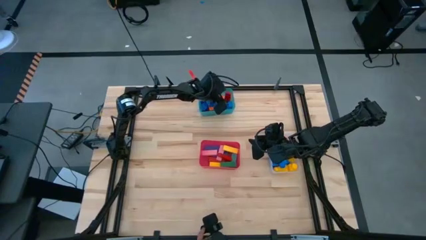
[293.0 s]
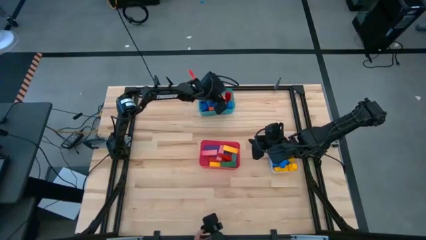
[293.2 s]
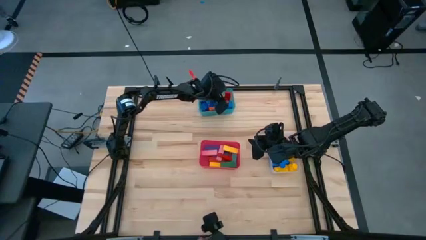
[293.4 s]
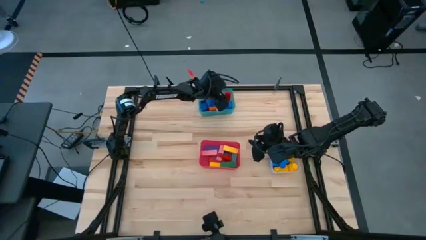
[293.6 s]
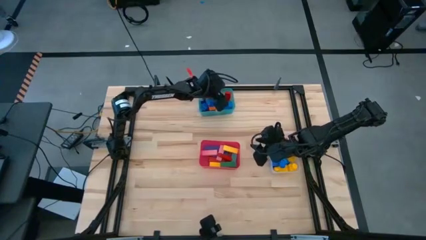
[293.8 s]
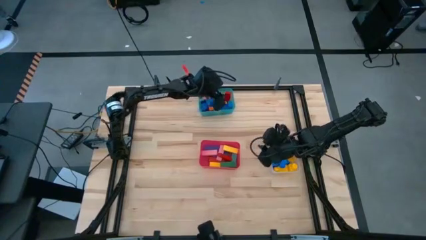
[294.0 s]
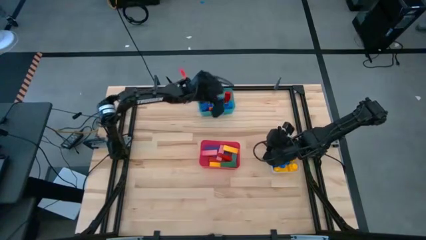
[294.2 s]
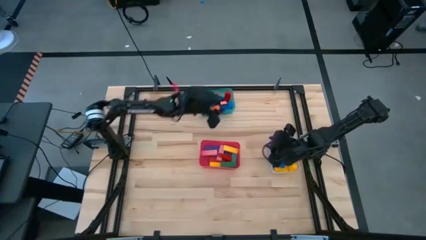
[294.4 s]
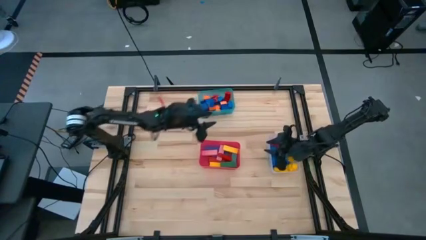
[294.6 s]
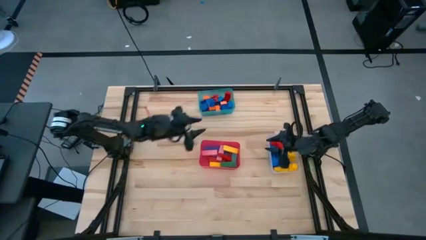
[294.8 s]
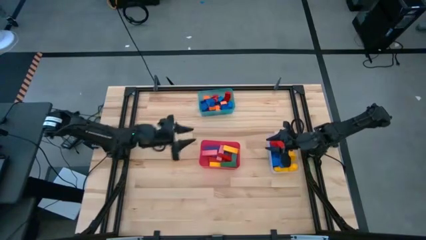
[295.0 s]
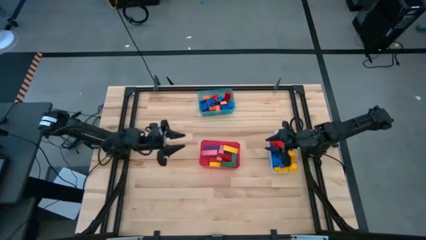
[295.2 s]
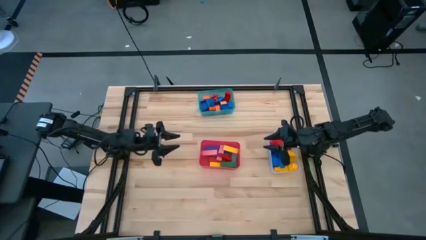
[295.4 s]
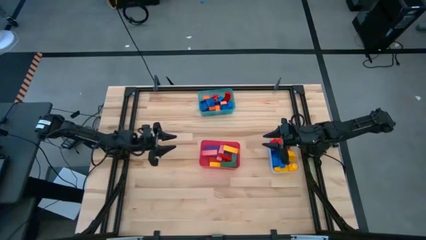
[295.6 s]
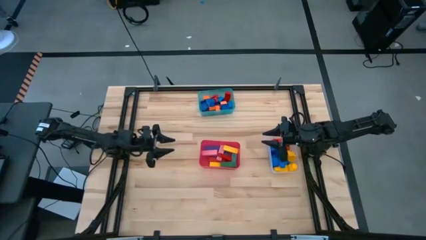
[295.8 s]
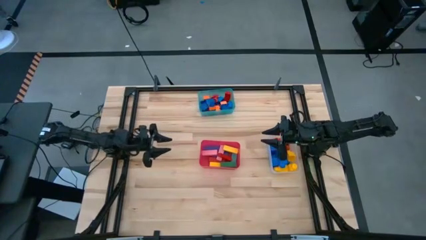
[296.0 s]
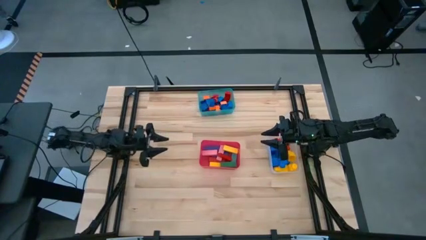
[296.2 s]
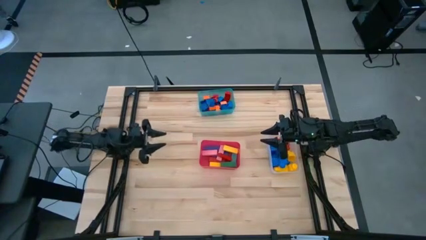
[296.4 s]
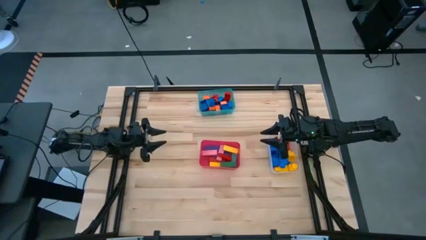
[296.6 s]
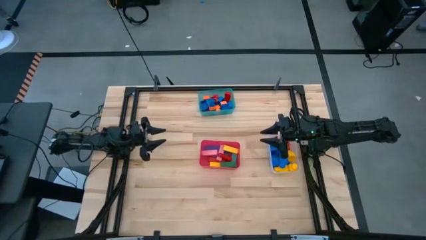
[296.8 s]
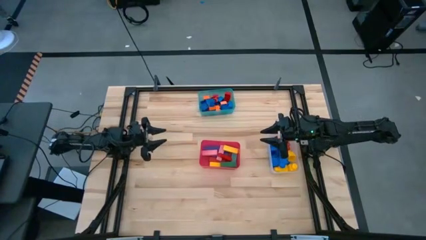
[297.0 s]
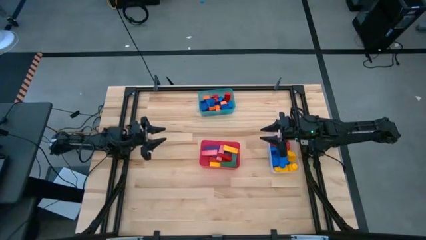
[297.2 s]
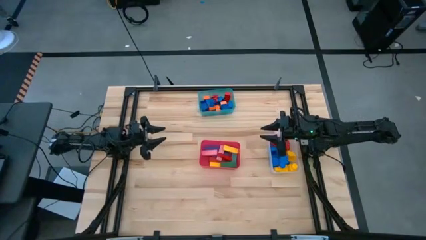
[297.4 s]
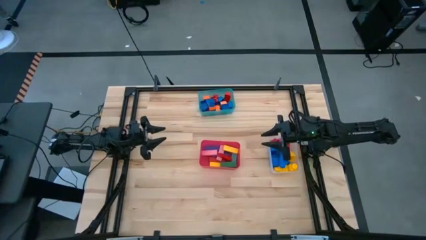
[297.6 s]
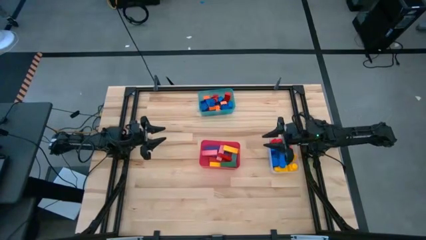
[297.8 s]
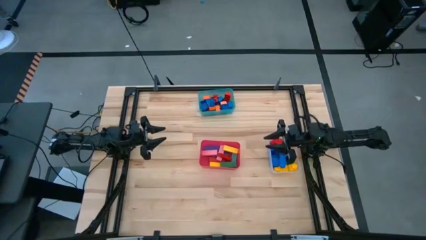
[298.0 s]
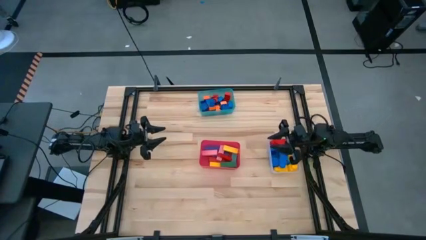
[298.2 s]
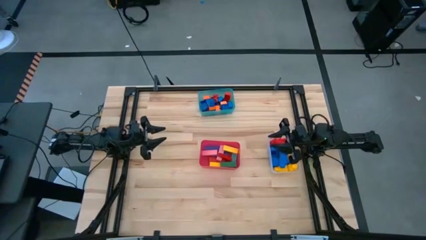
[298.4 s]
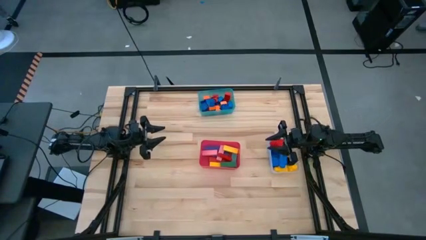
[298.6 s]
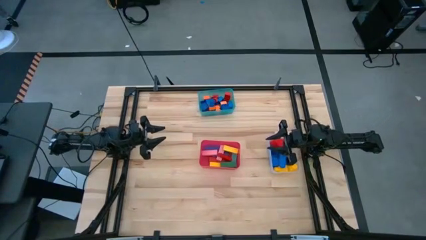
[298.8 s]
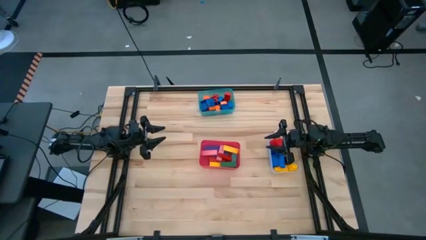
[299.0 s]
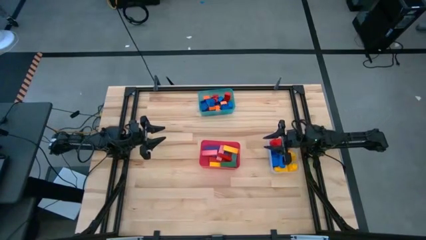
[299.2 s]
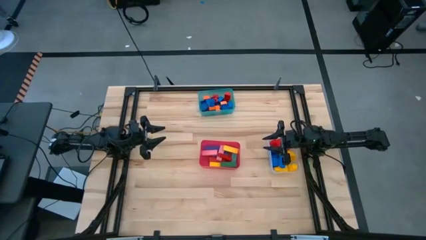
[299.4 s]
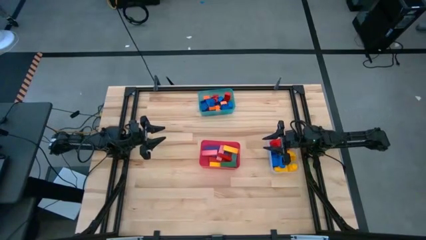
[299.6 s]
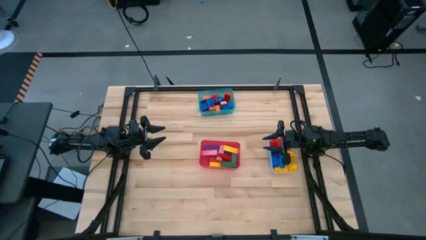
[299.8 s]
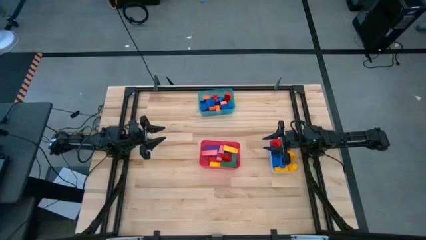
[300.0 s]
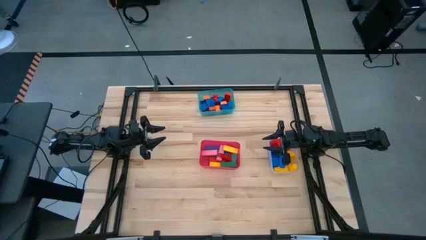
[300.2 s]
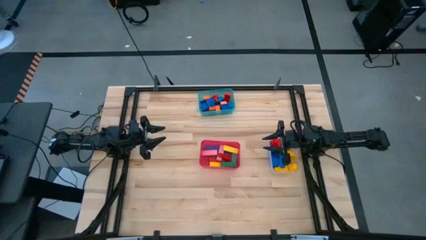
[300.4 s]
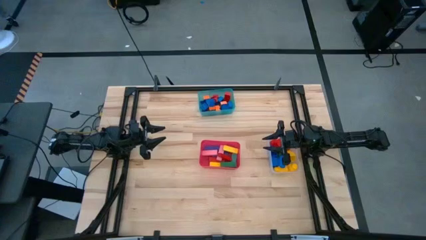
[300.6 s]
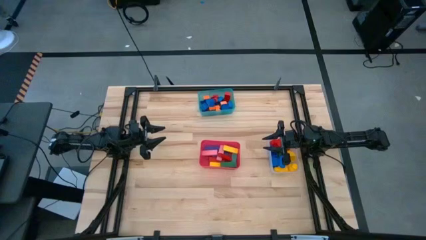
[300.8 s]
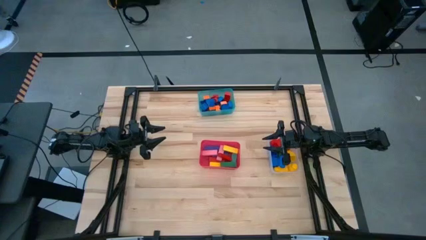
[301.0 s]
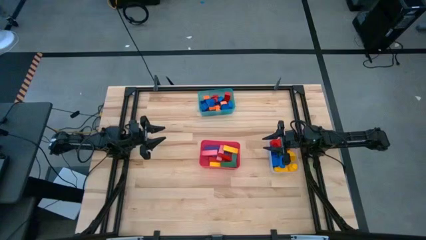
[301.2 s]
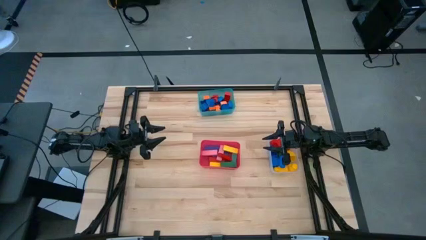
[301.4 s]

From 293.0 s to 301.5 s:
Task: Sort blocks by size
Return to Home Position

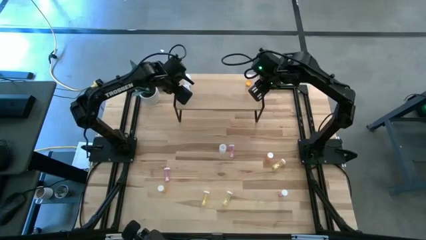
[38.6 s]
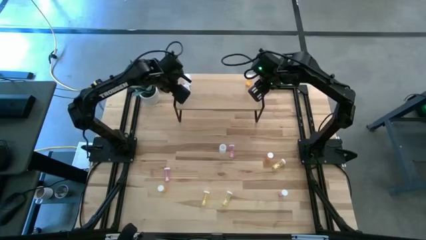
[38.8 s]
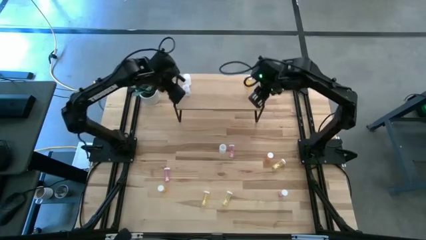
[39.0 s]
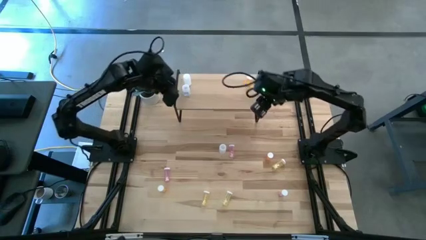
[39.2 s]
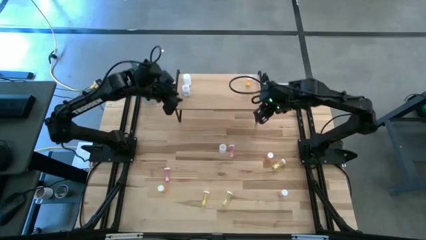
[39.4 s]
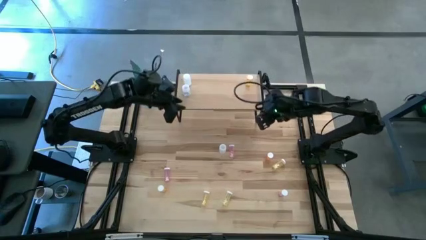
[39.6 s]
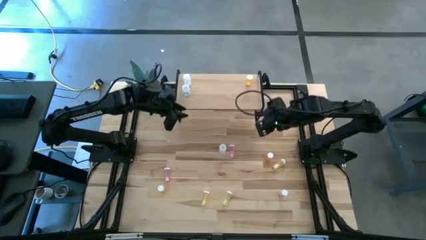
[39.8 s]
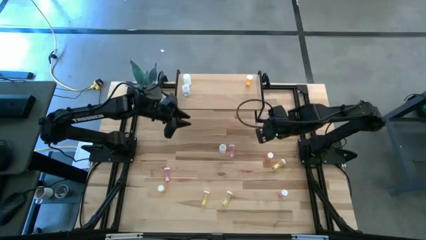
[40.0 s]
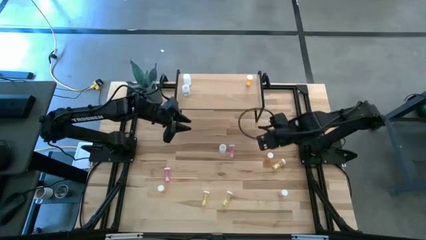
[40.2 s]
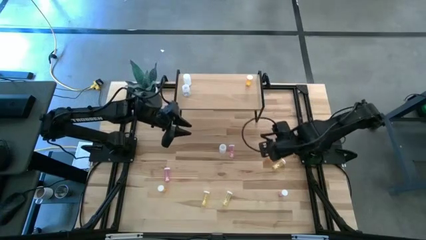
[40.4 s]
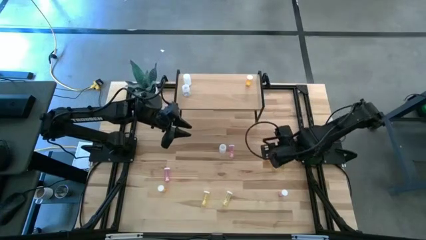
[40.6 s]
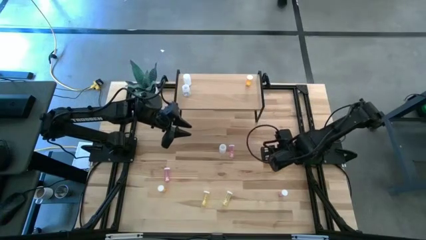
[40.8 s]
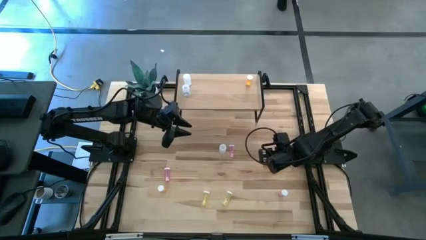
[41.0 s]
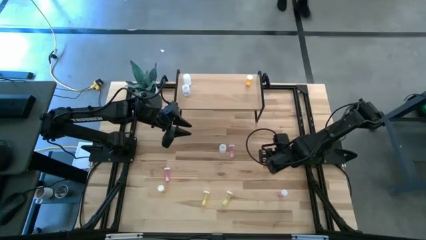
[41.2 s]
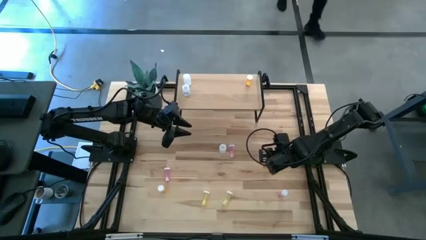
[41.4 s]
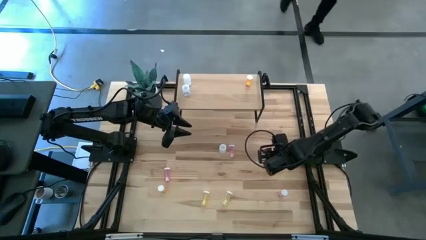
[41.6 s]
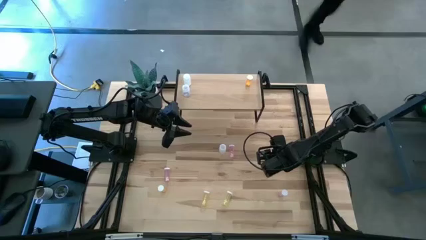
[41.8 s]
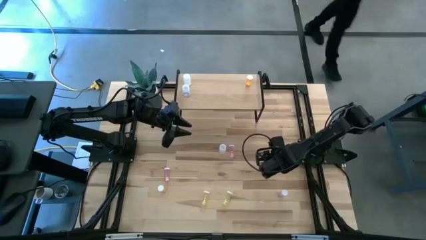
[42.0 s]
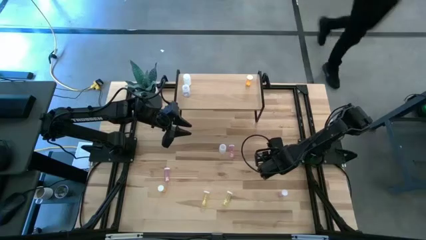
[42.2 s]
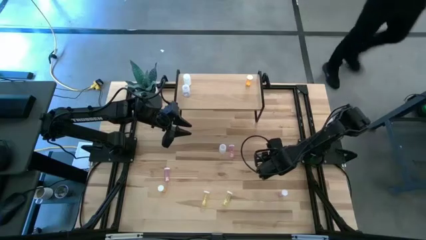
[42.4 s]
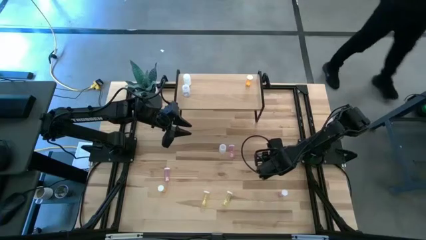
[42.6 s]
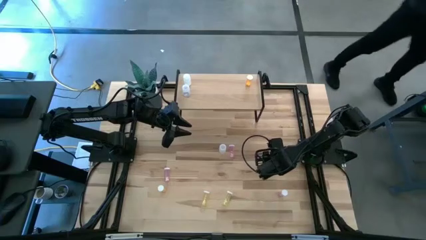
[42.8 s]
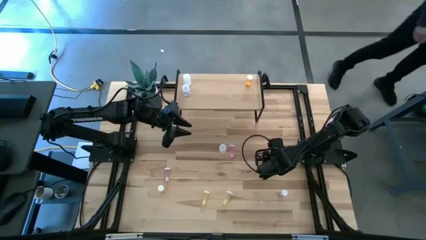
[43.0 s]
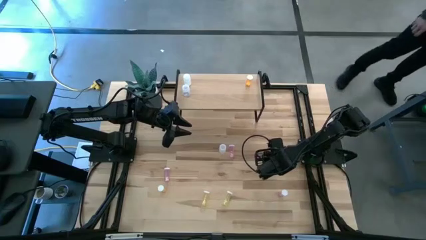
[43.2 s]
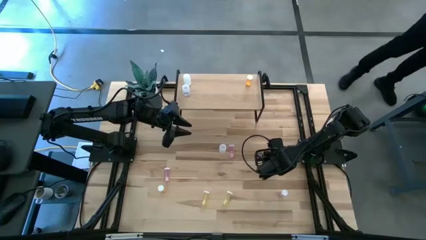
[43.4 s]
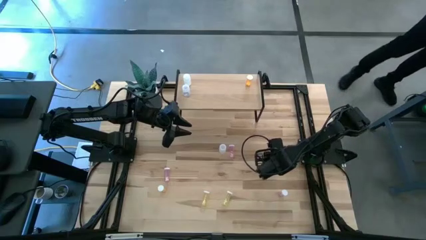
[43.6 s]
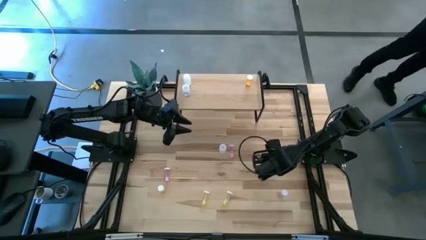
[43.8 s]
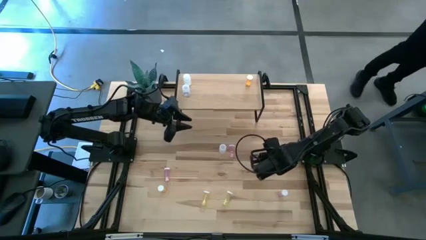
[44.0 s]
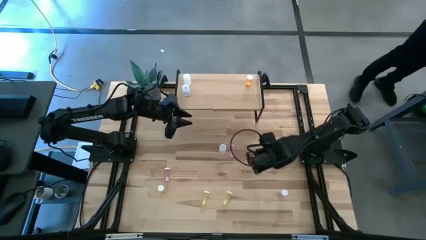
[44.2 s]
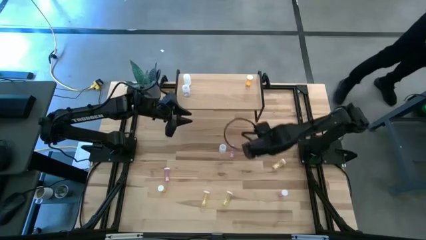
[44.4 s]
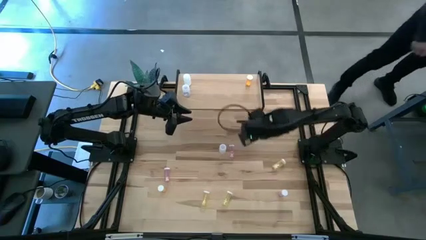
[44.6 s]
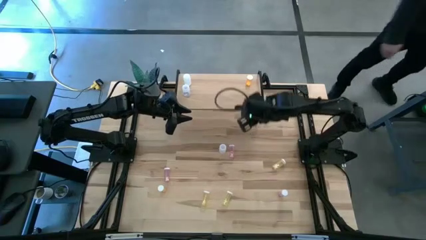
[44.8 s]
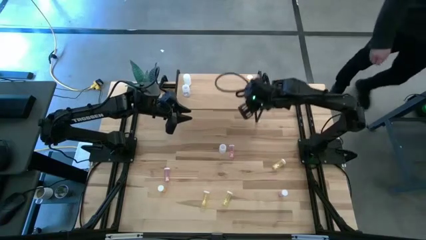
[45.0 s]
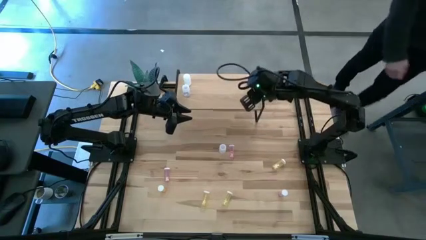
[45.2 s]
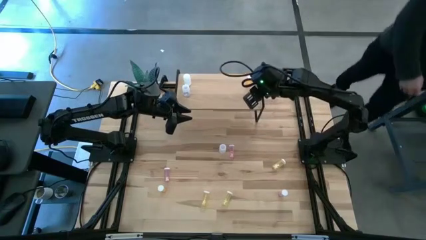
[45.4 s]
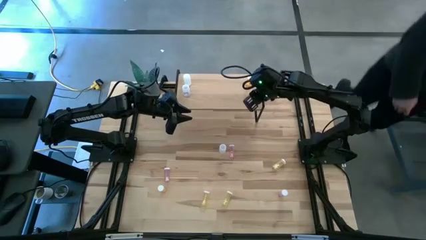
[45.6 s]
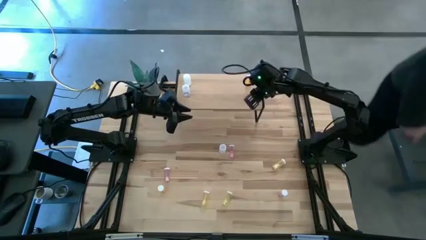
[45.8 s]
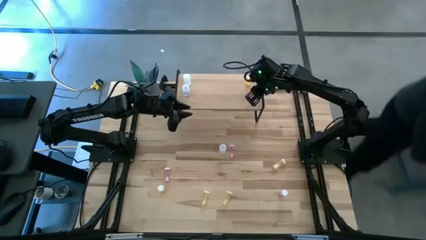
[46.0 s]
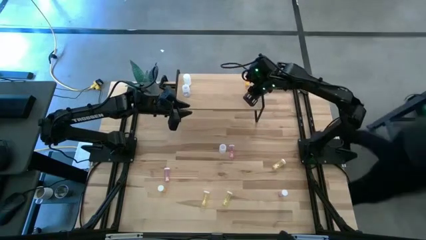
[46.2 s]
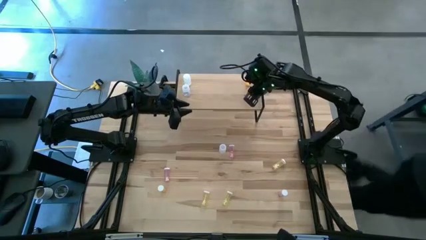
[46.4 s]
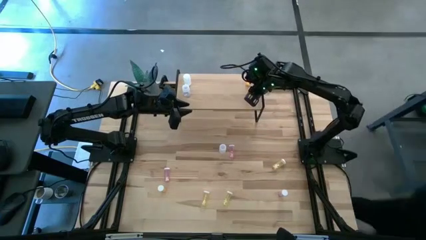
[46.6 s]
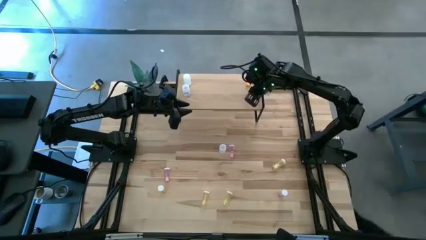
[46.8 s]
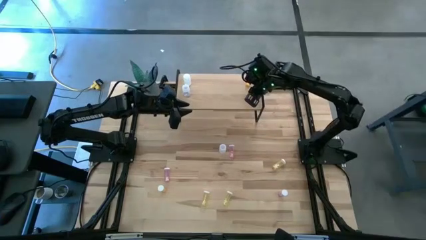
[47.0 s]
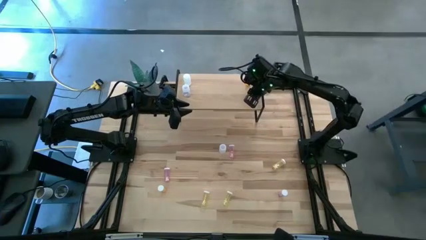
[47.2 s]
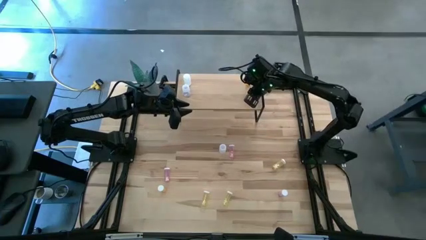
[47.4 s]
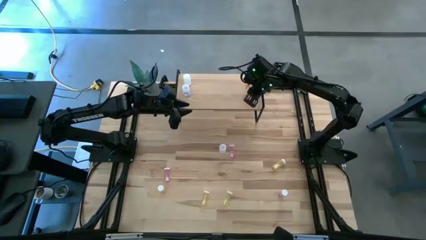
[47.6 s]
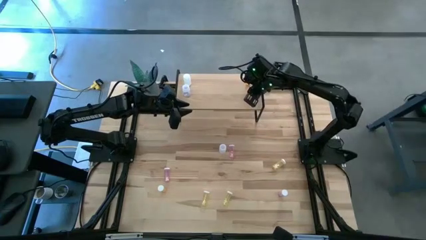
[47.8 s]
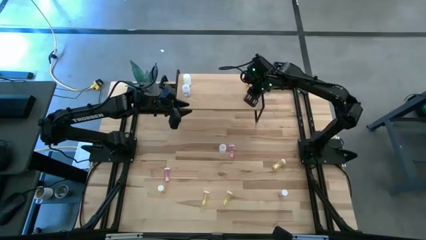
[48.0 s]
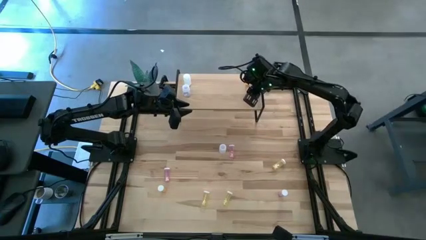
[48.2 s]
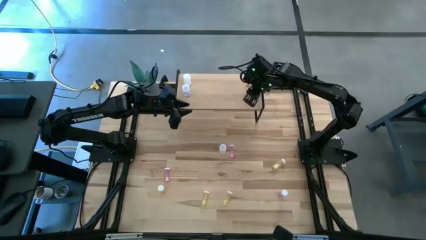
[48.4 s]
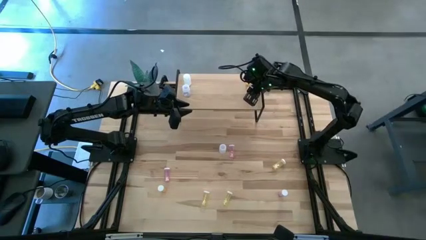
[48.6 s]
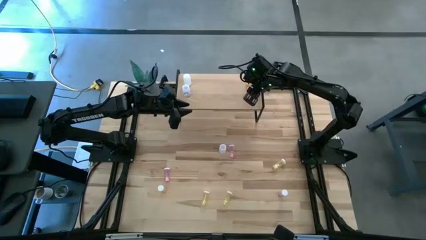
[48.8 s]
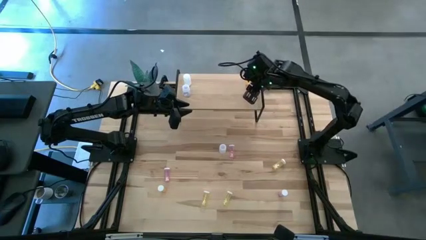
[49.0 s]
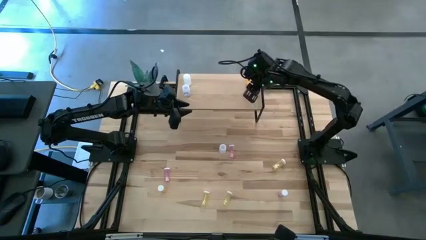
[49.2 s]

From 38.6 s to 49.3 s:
Task: Pick and place medicine bottles onto shelf by color
Put the right orange pill bottle aligned with the other orange pill bottle on the shelf
